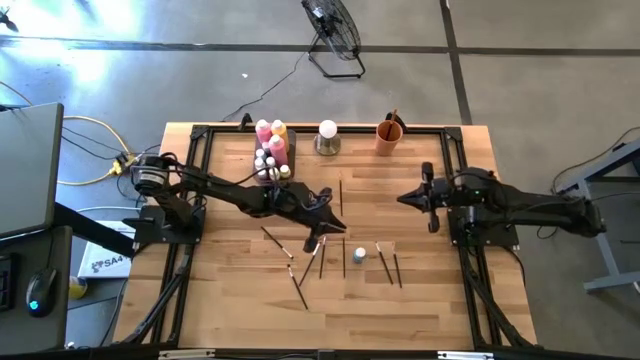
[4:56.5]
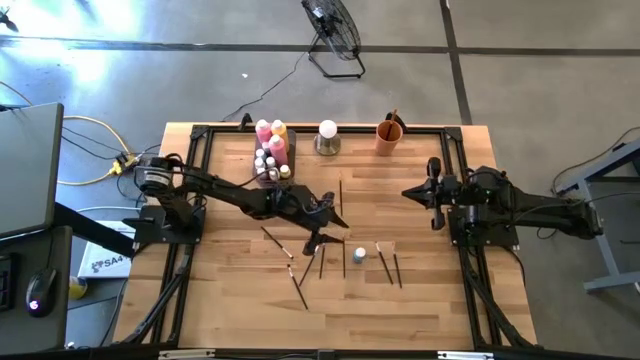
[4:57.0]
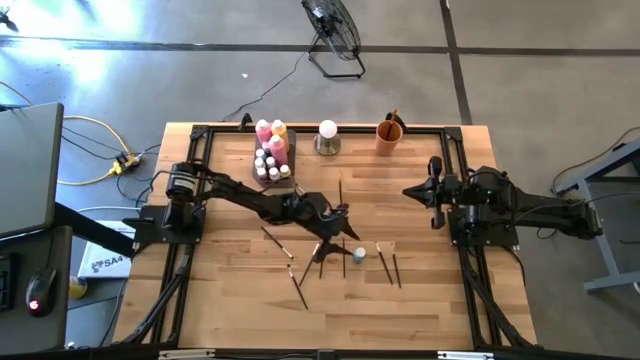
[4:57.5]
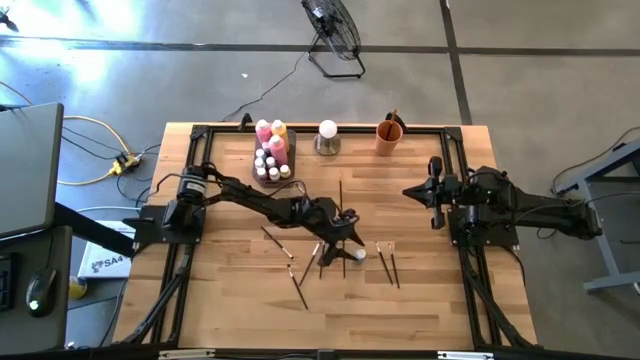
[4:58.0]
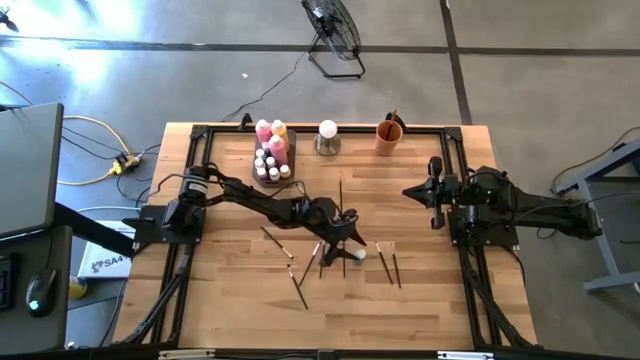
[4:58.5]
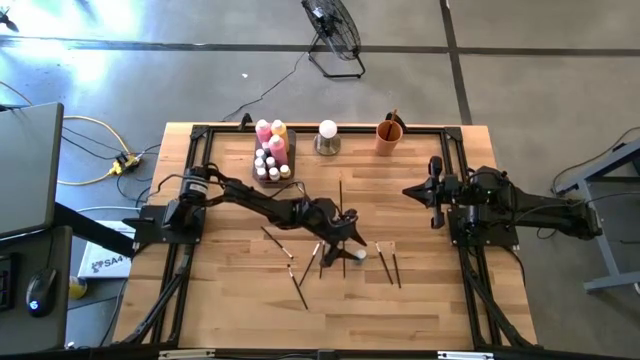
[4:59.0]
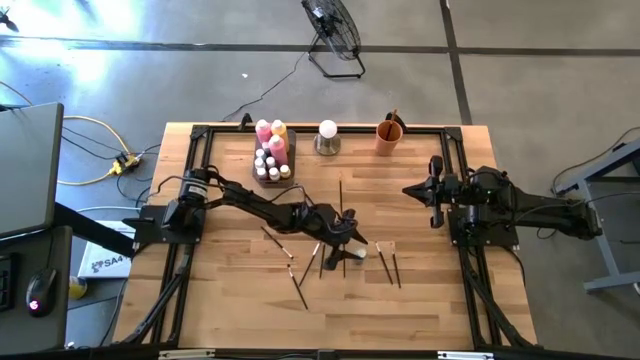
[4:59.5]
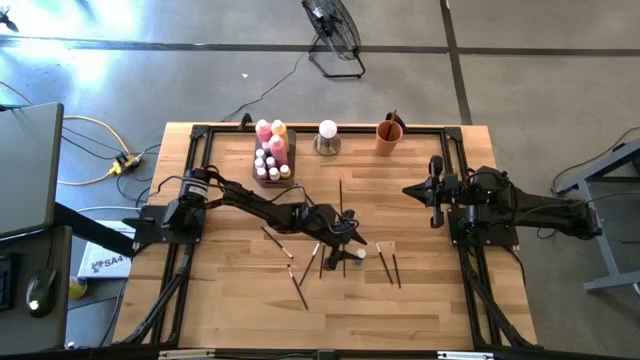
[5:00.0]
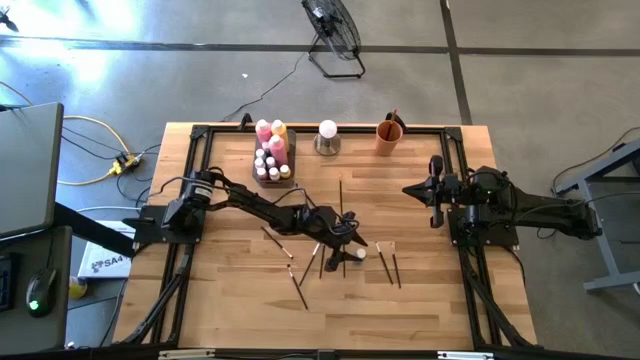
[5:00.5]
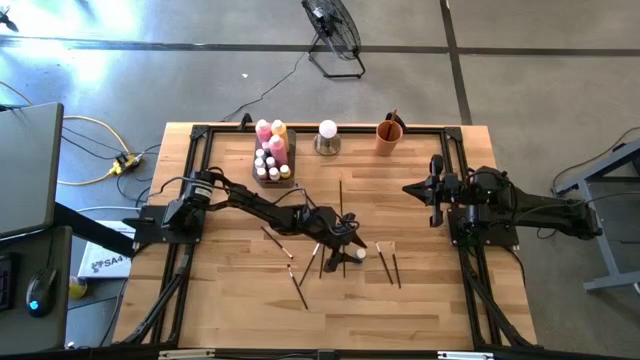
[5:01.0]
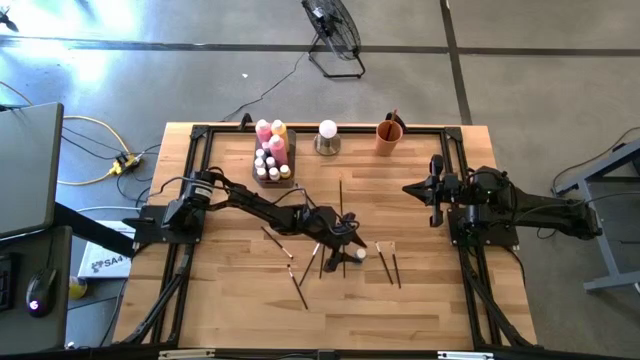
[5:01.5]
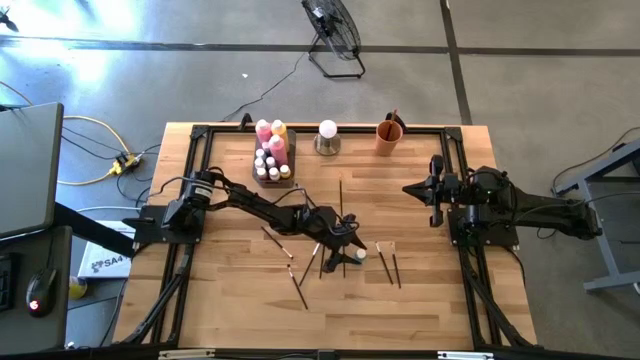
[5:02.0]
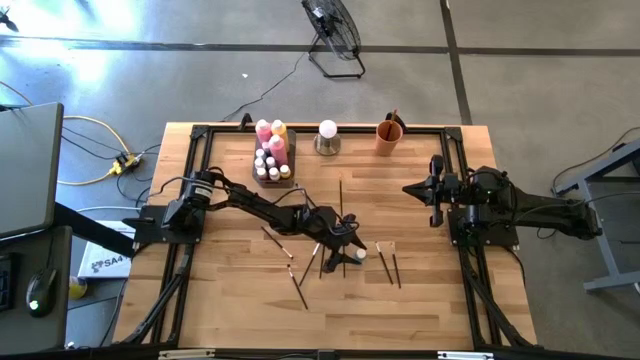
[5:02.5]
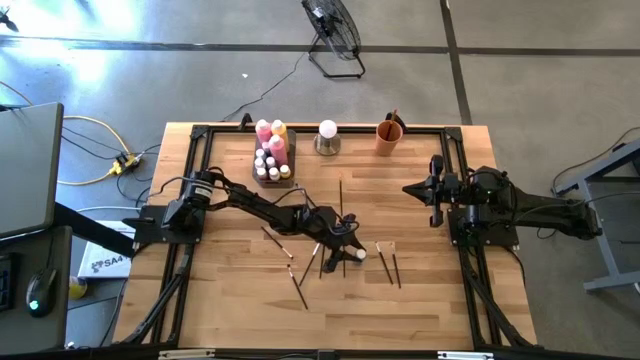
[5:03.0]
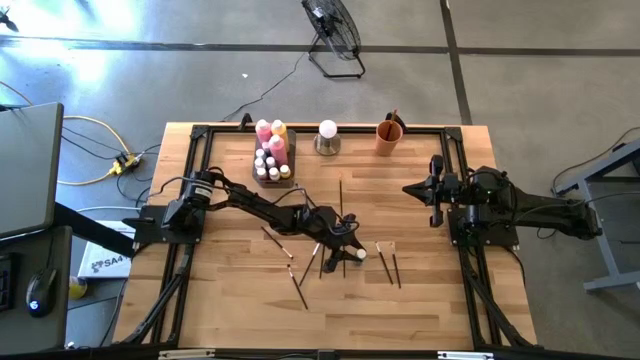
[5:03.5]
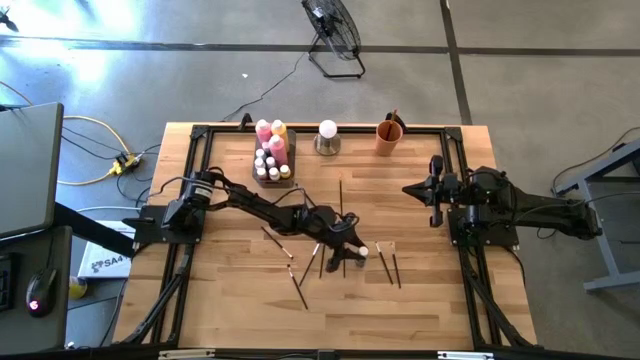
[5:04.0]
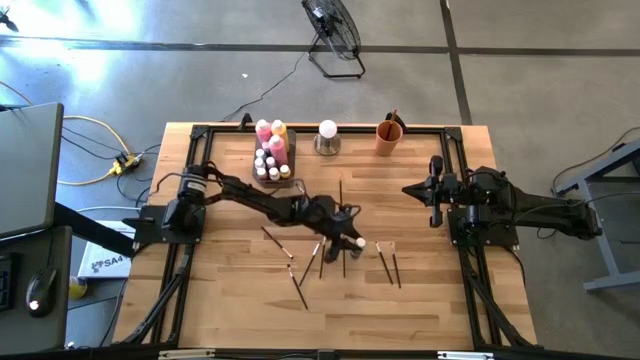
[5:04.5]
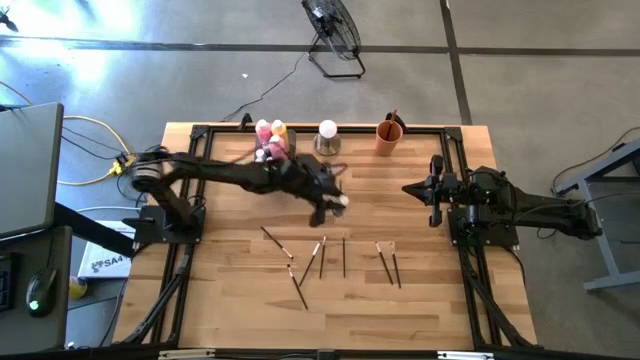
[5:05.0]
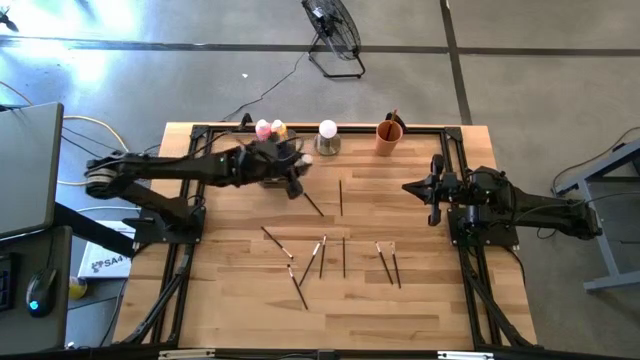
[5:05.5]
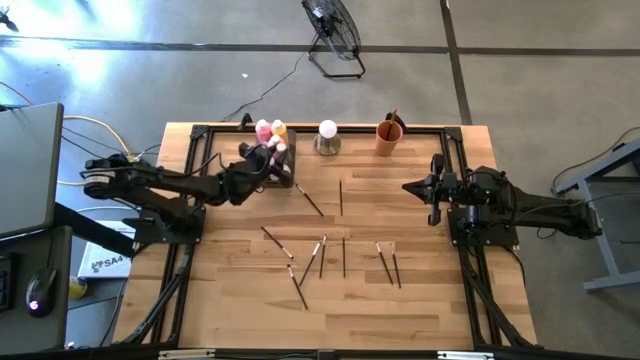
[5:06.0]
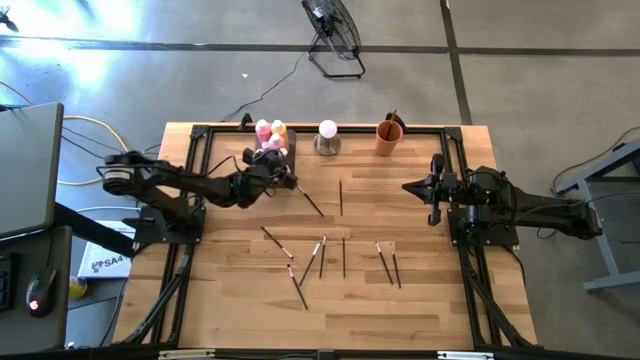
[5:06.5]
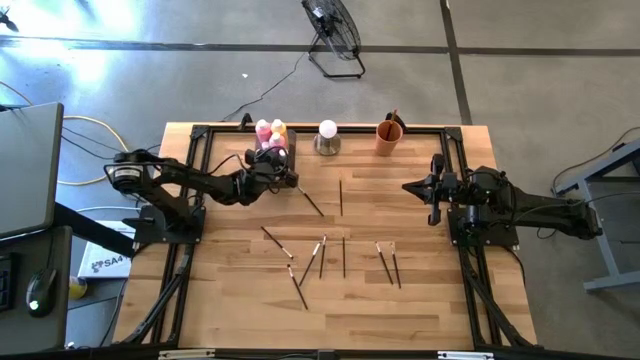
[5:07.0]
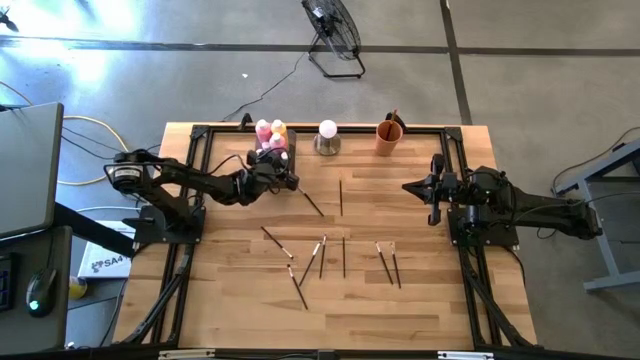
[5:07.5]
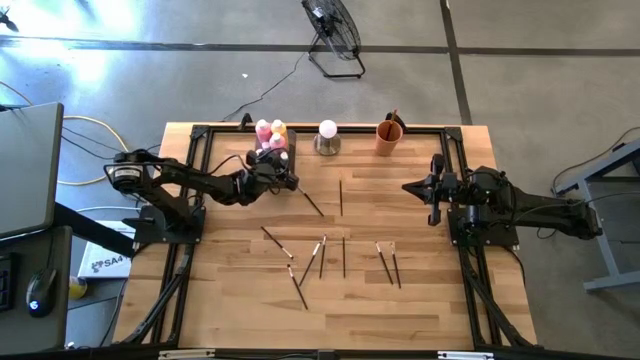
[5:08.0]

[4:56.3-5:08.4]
Task: Pick & Place Paint Supplies
Put the small blue paint bottle into the gray bin

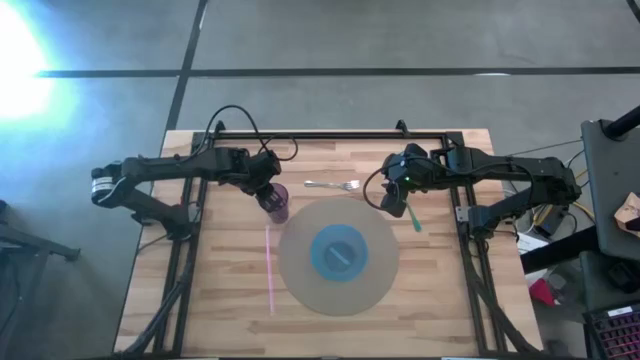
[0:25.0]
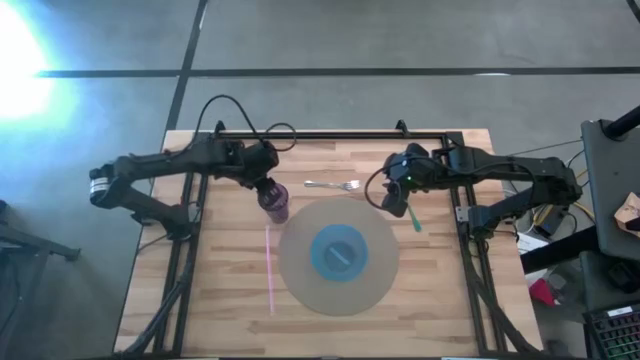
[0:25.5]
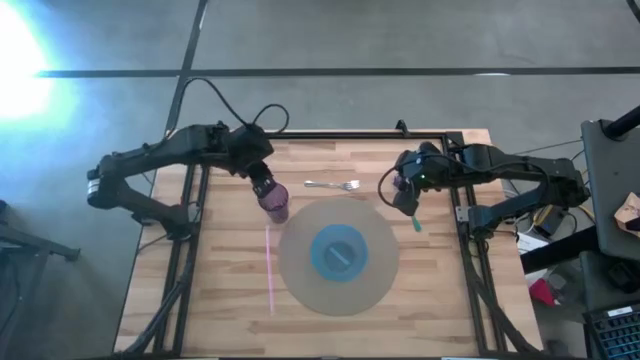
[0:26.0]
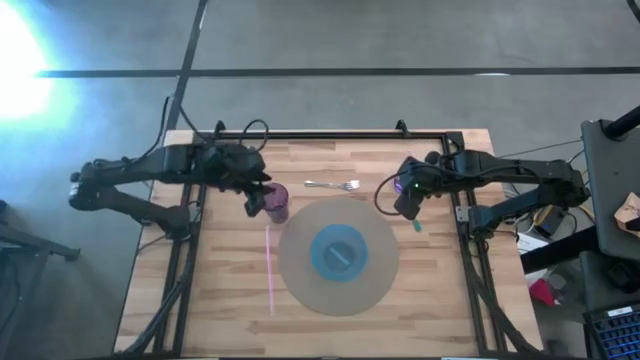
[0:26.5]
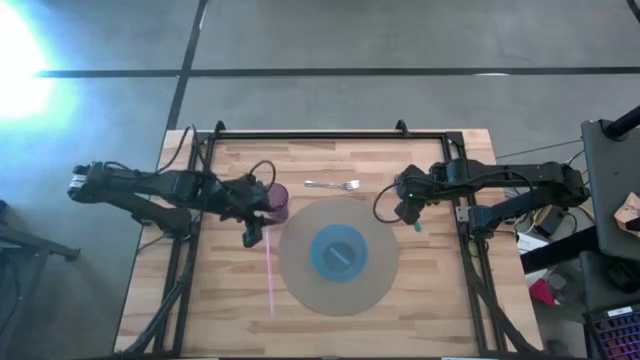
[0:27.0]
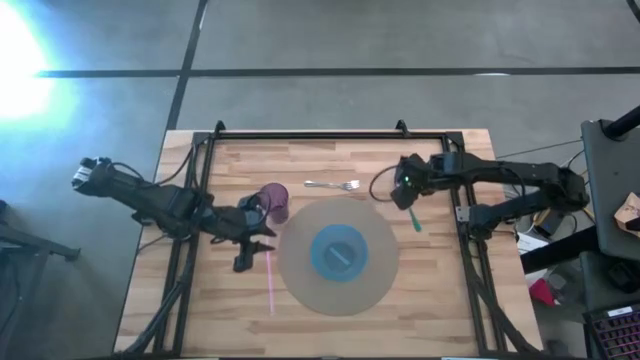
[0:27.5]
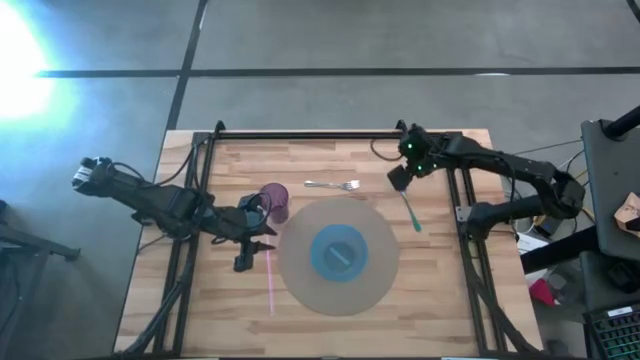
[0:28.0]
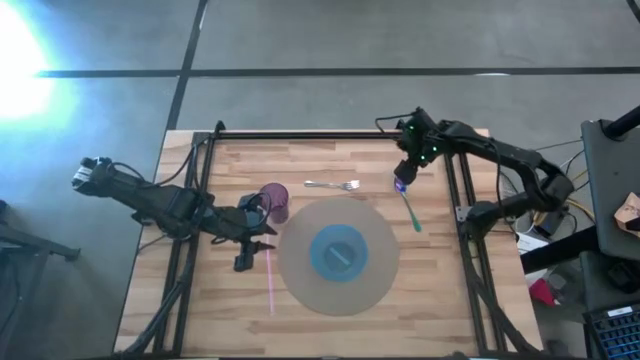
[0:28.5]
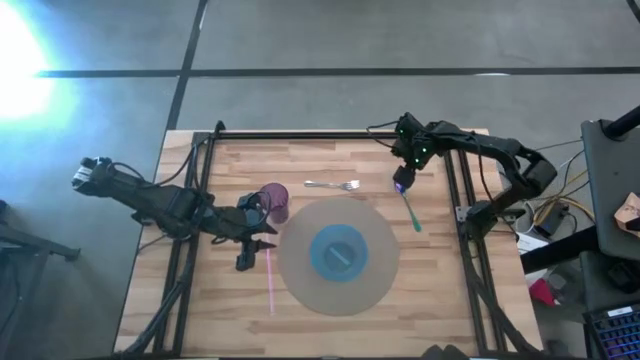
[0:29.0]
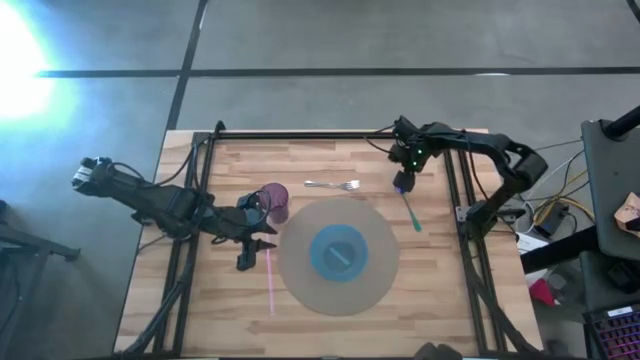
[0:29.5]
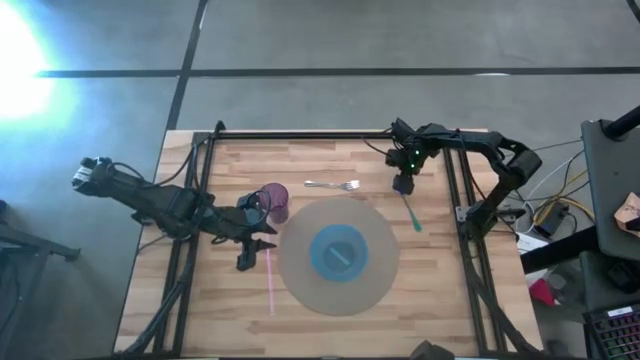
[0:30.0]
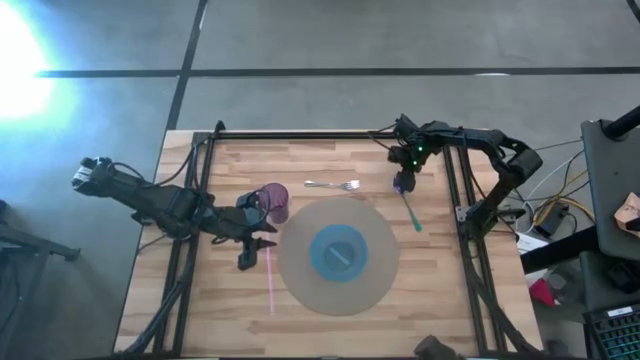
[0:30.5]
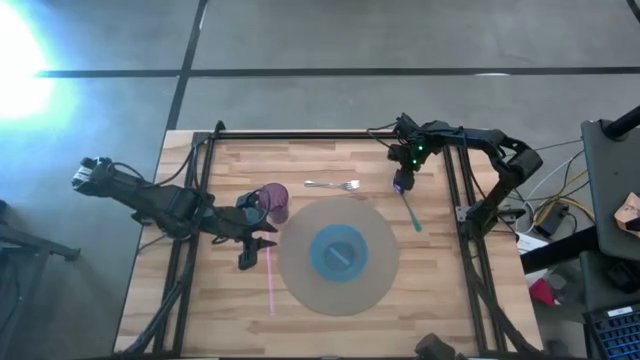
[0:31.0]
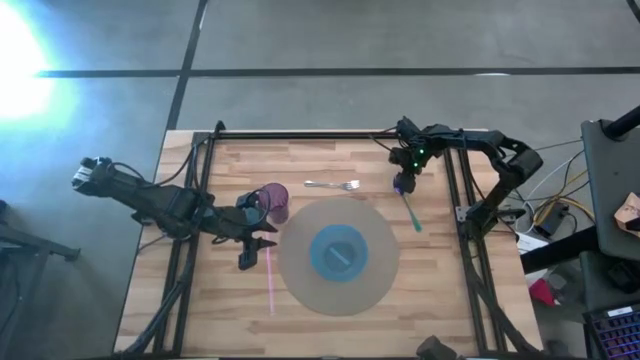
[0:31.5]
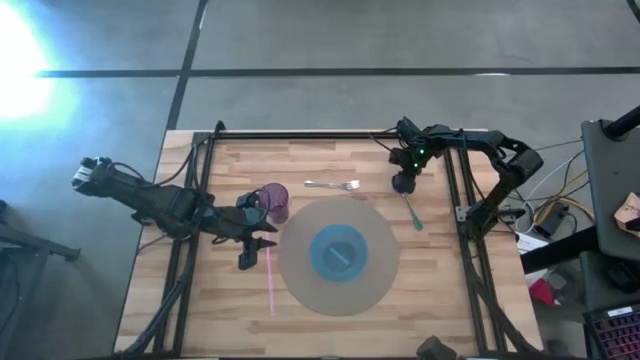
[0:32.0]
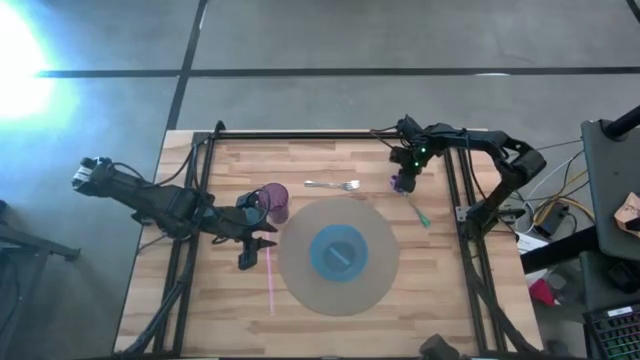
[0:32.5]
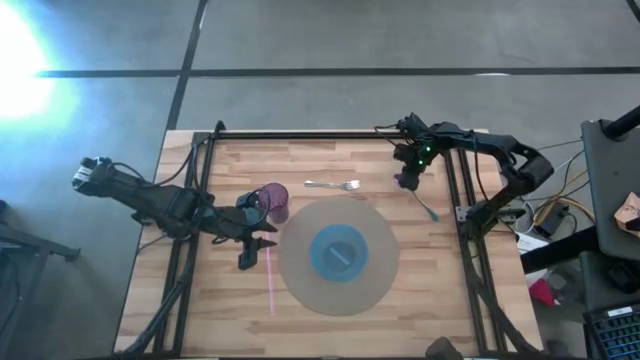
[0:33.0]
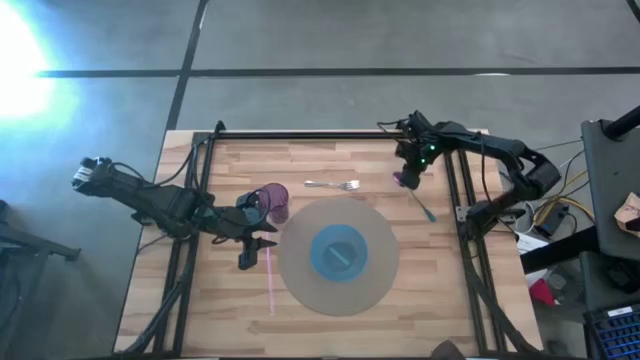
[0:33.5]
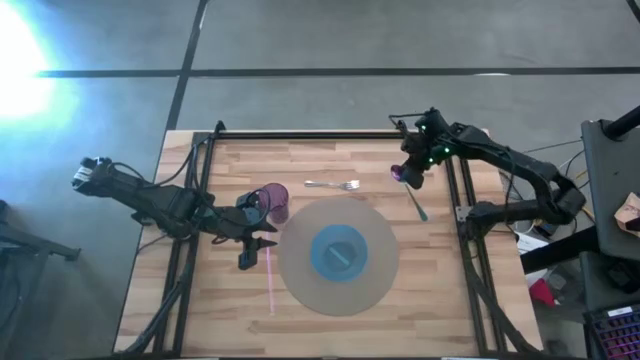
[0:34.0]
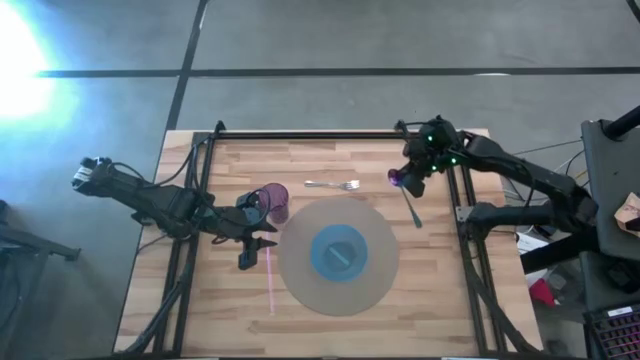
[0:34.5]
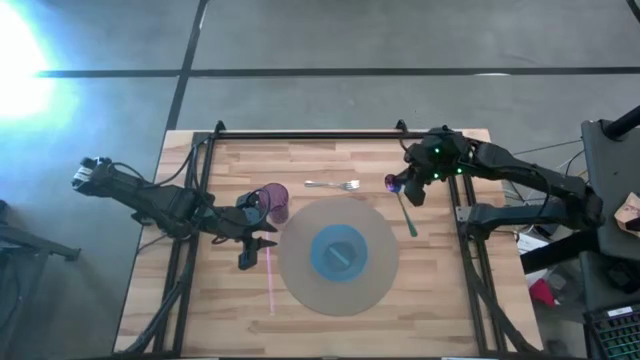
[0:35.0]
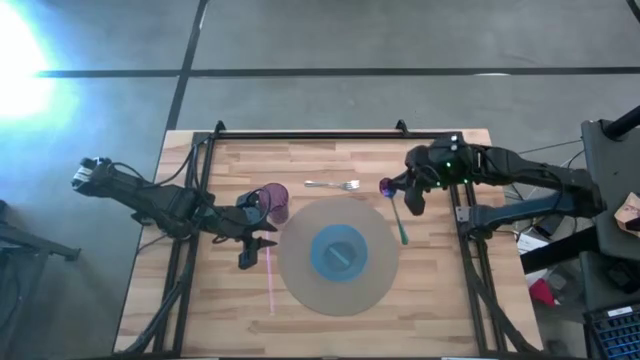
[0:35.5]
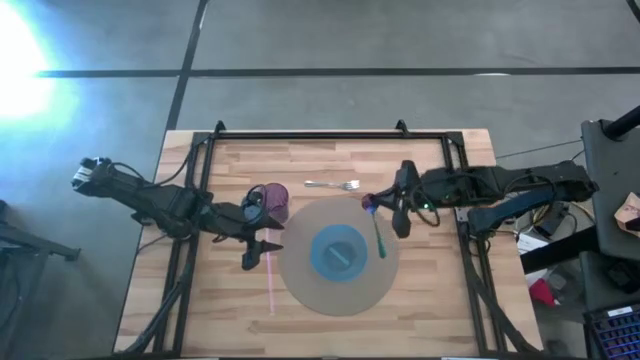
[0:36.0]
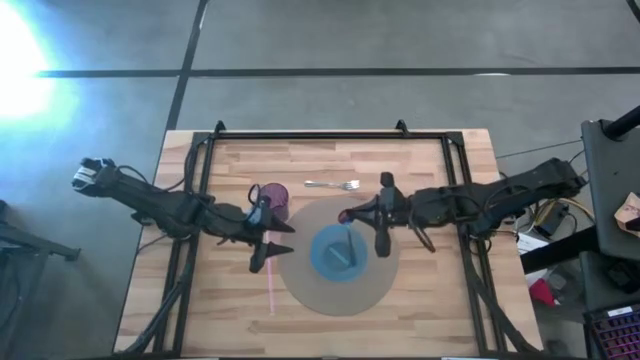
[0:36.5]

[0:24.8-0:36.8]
Task: Pick & Place Utensil
Put the purple spoon into the bowl
